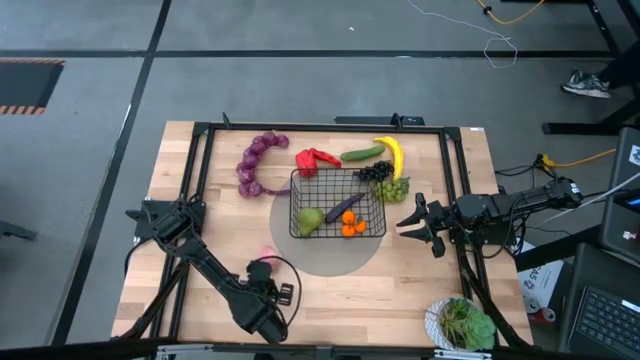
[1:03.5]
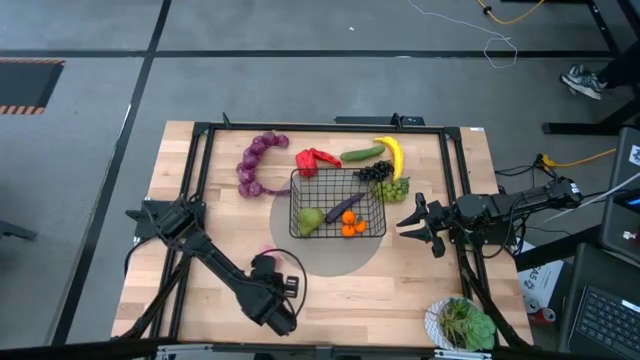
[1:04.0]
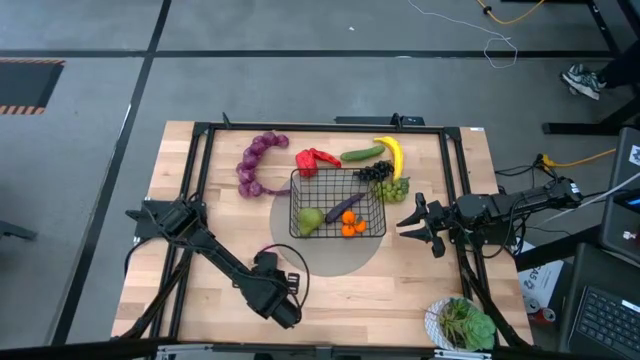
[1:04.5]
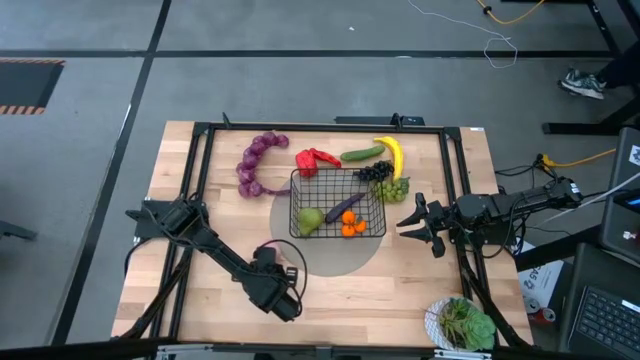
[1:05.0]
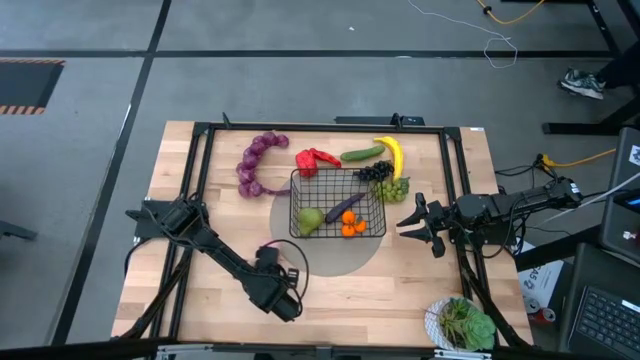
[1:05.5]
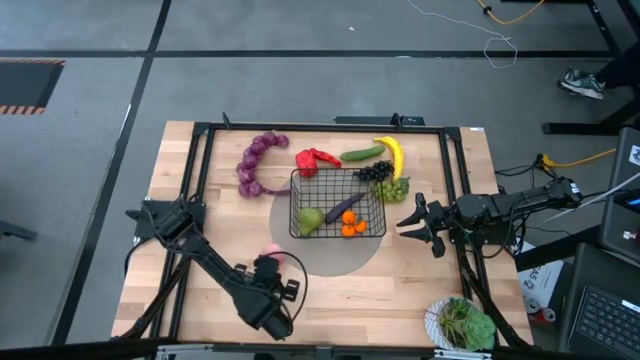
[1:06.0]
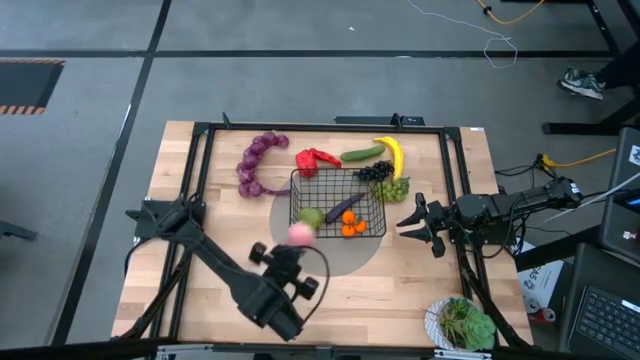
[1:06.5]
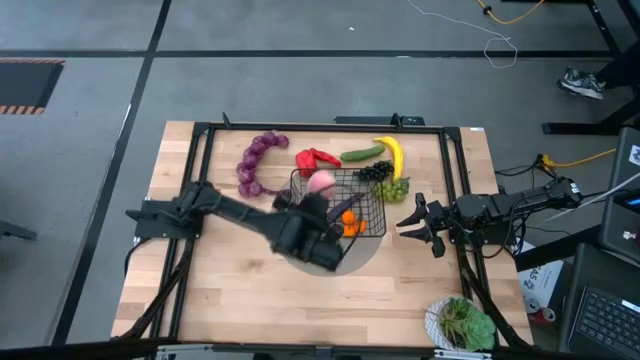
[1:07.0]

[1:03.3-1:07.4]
Task: Build produce basket
Put the apricot into the wire basket

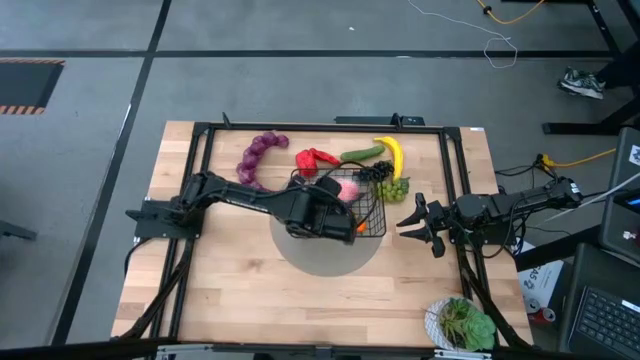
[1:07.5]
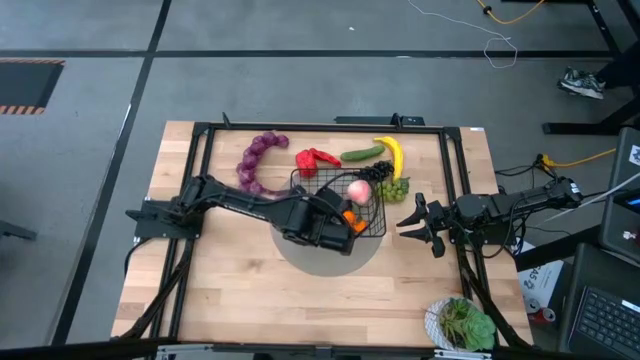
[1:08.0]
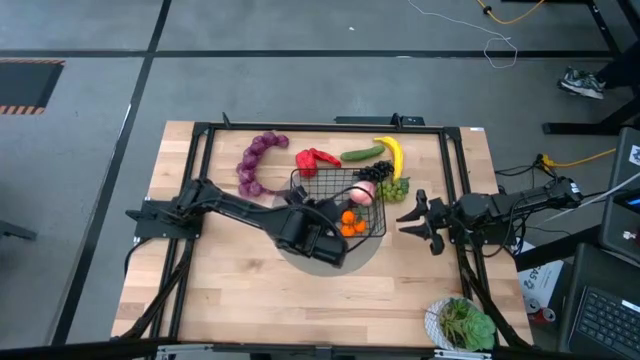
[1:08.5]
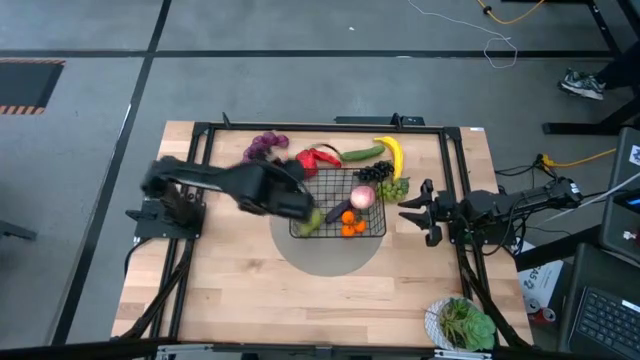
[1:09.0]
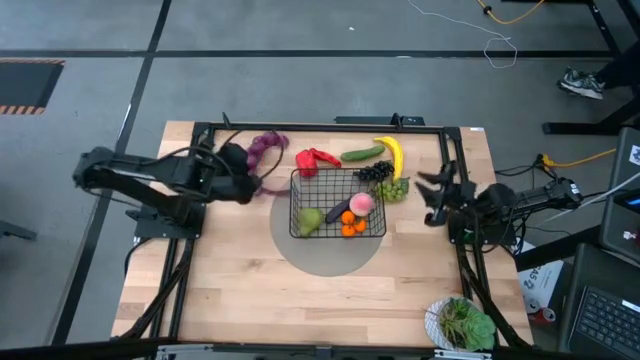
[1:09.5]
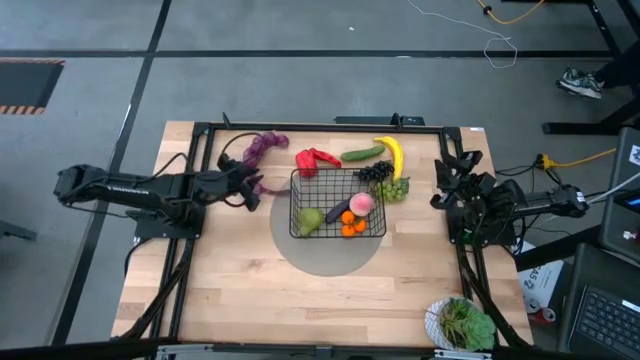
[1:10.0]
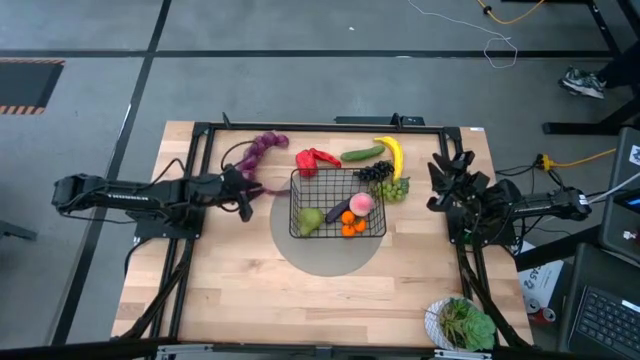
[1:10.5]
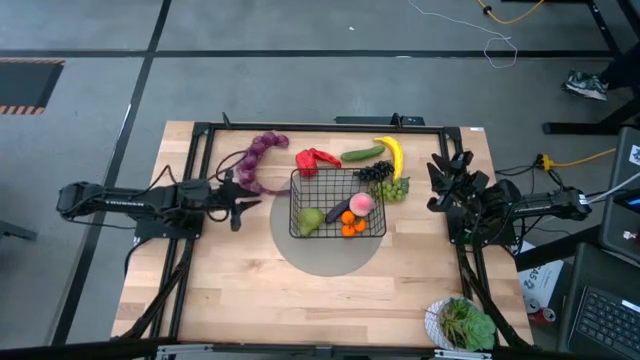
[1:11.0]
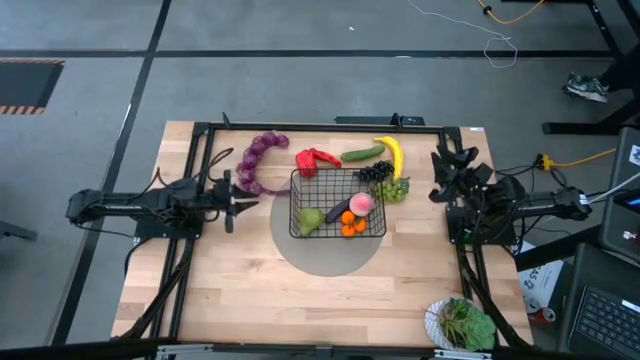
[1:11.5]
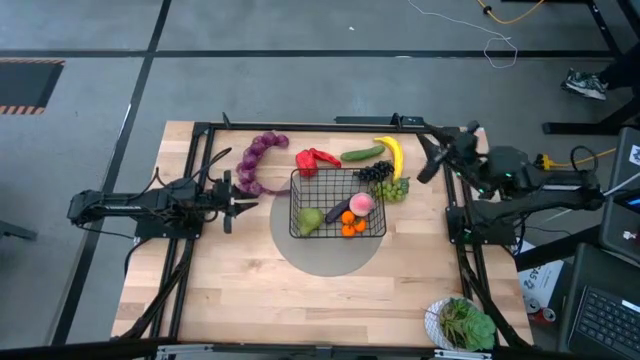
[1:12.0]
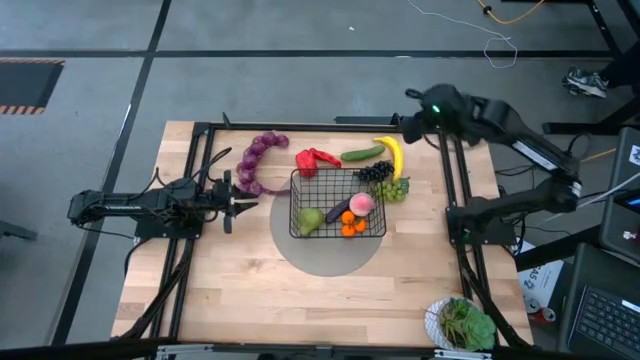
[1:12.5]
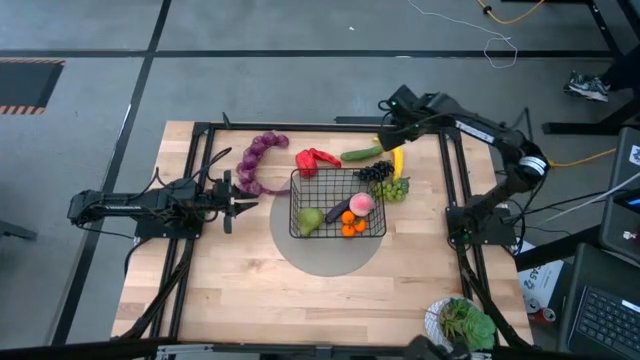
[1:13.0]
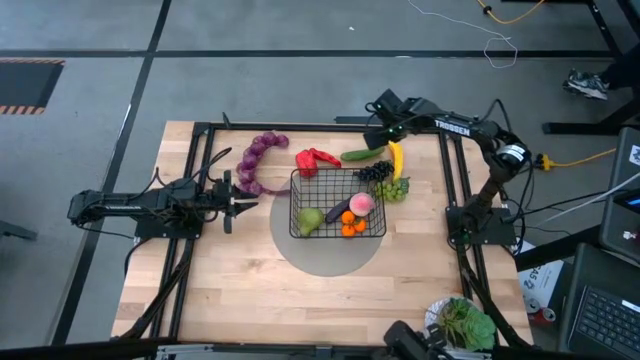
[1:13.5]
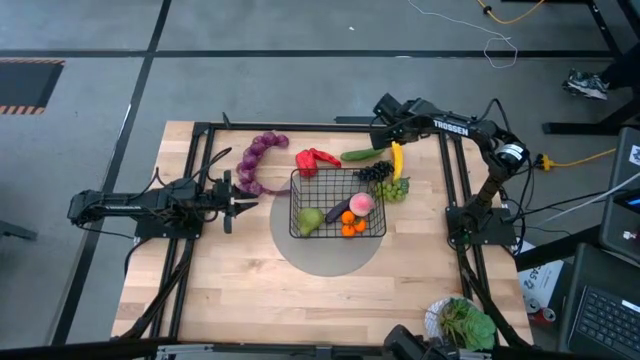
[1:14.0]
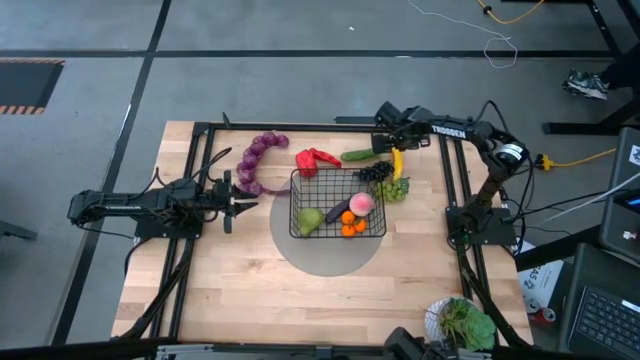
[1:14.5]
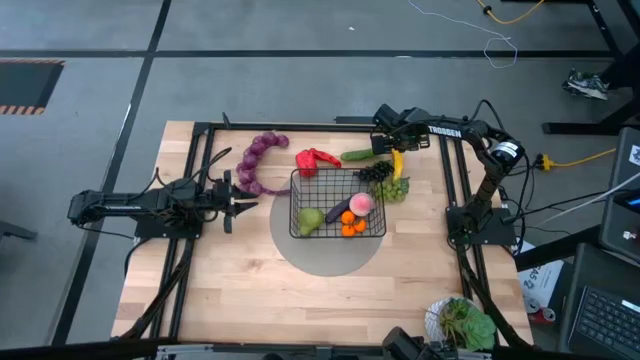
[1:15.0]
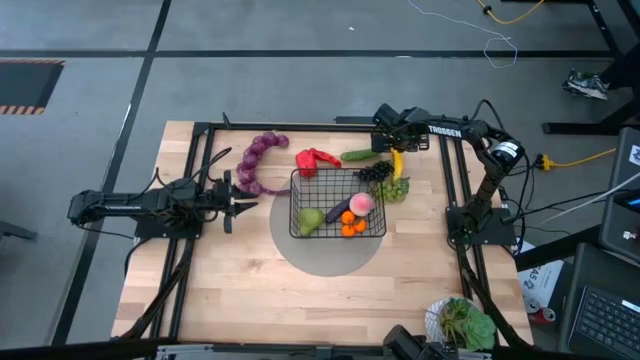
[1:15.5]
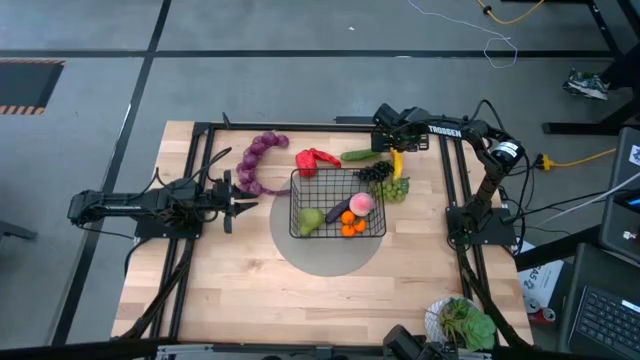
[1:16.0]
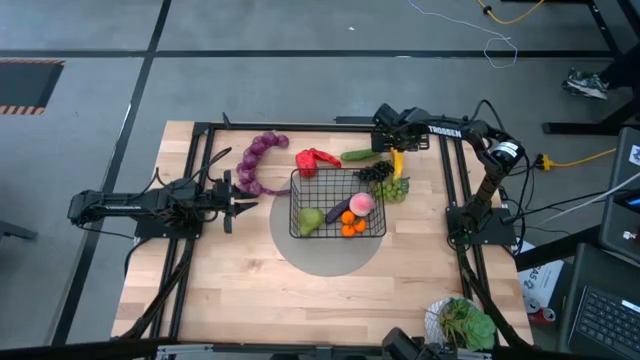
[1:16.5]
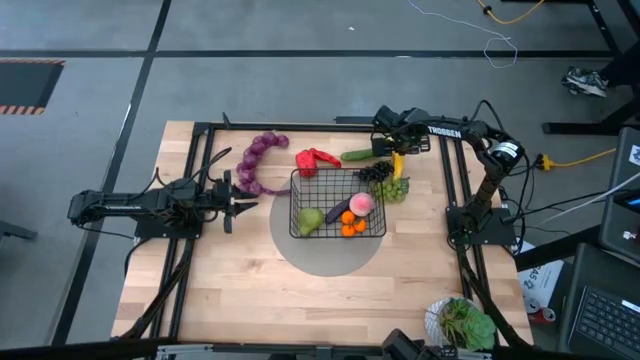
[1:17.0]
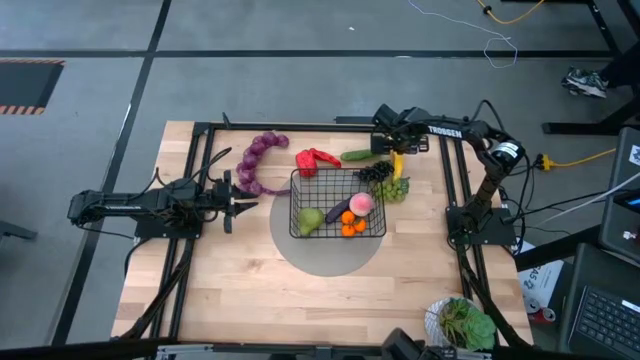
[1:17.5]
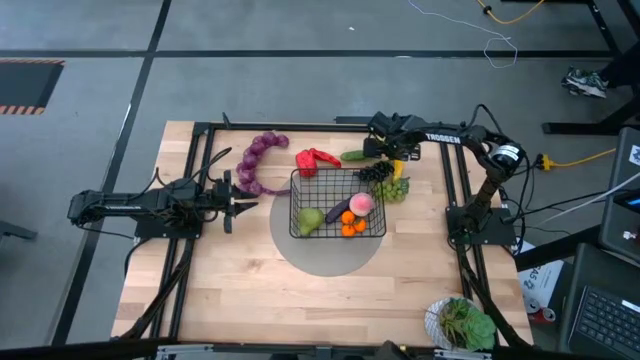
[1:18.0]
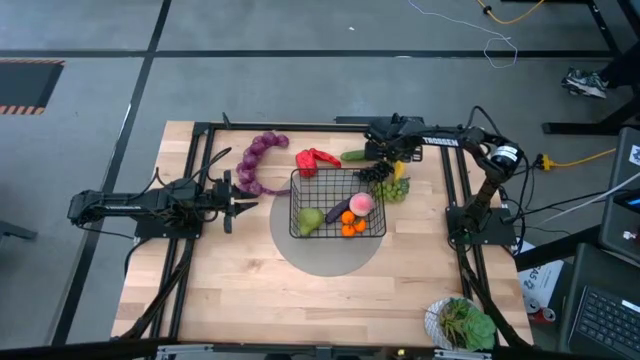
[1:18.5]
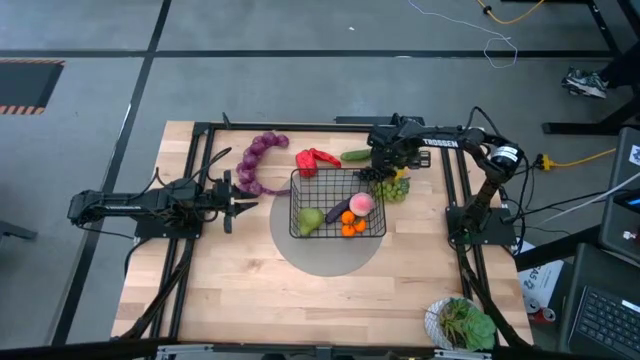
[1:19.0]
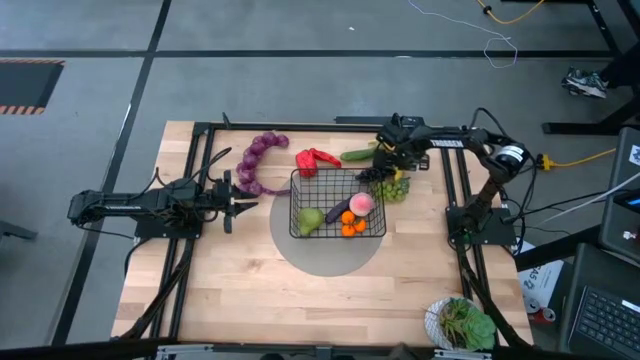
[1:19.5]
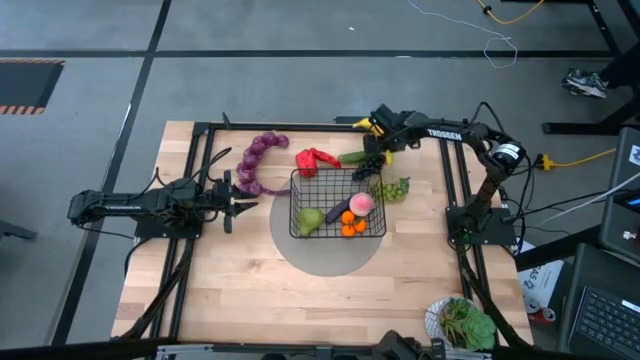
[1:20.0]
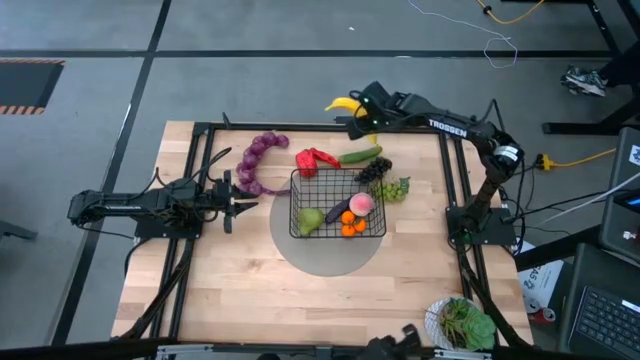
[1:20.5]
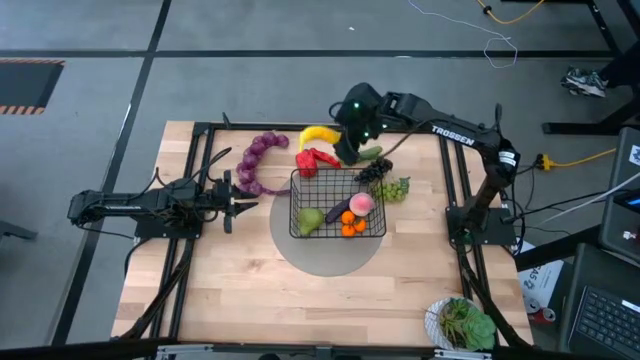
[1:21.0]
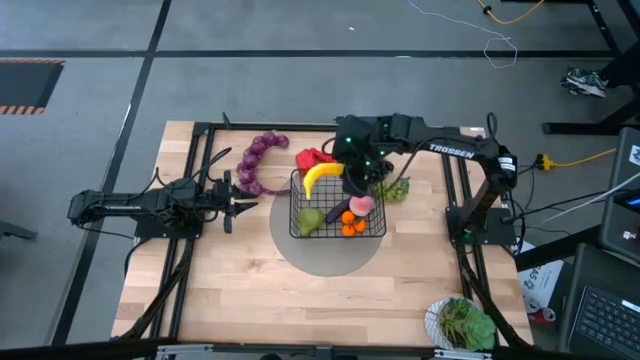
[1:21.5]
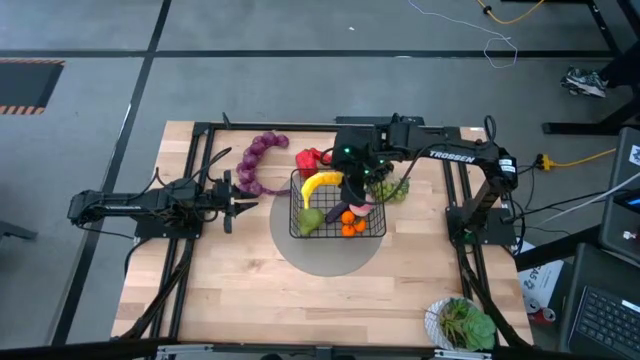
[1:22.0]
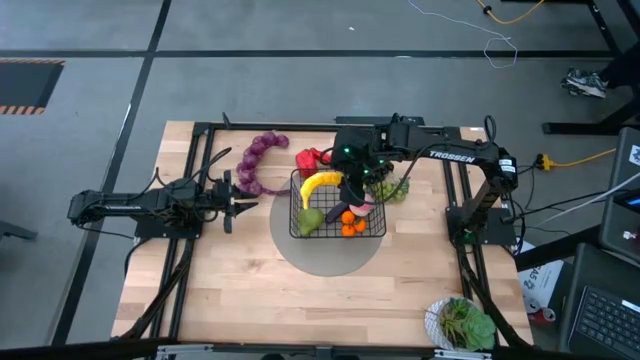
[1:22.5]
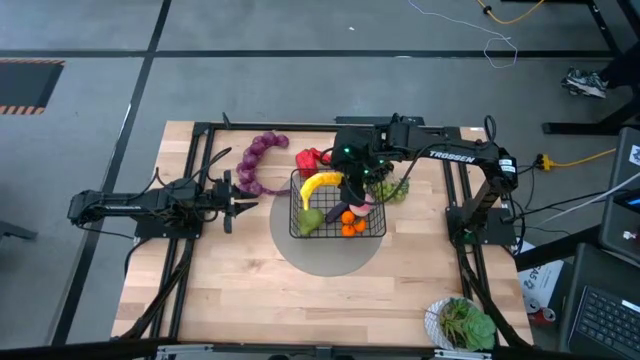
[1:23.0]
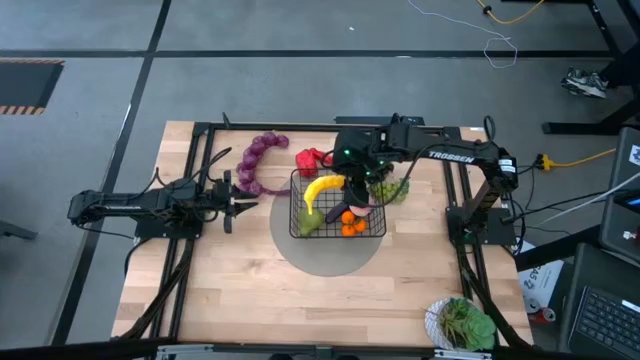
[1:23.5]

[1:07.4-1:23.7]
Put the banana into the wire basket
